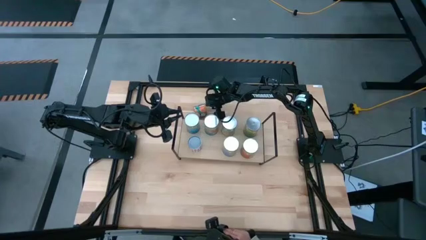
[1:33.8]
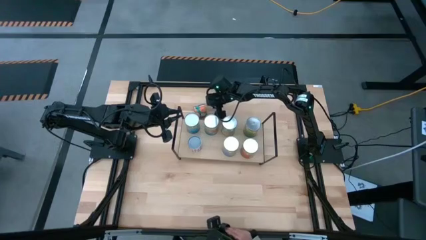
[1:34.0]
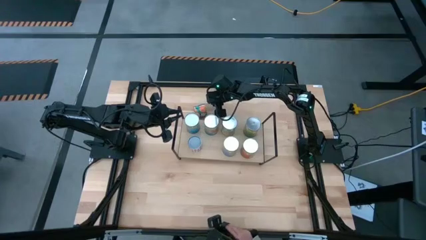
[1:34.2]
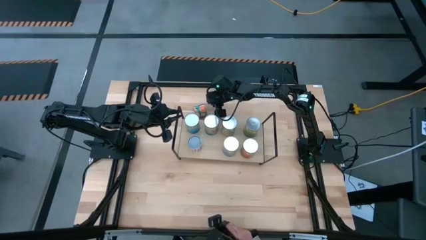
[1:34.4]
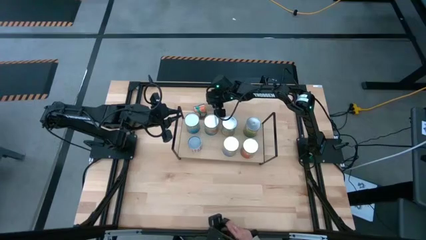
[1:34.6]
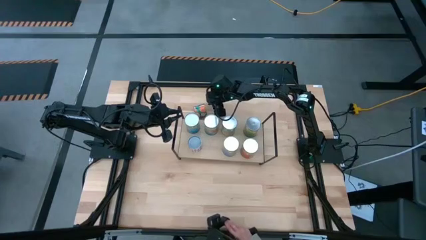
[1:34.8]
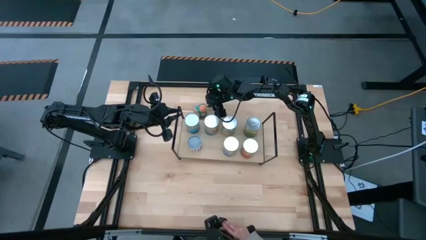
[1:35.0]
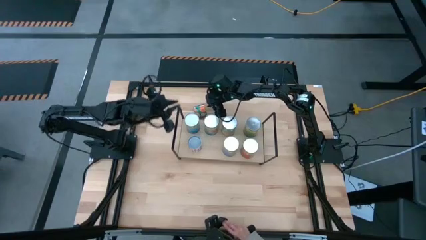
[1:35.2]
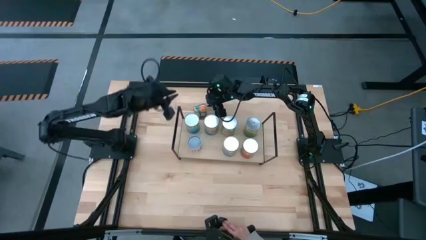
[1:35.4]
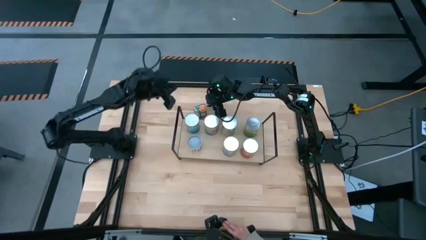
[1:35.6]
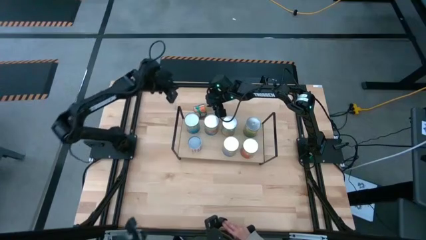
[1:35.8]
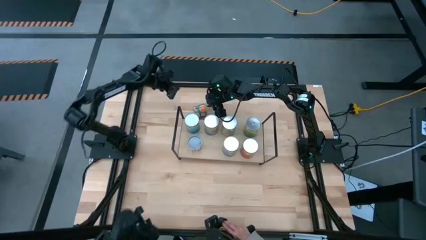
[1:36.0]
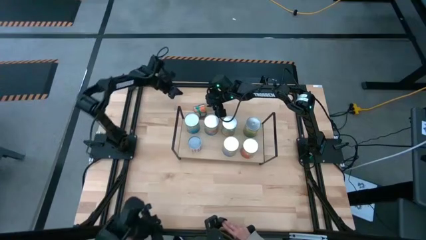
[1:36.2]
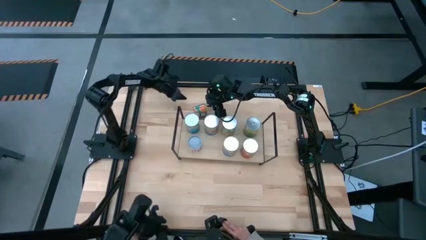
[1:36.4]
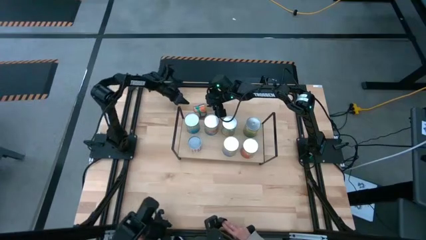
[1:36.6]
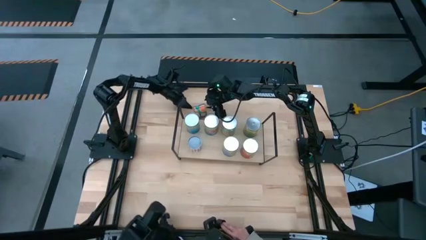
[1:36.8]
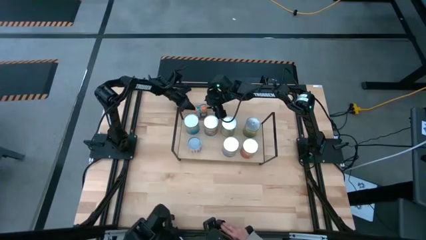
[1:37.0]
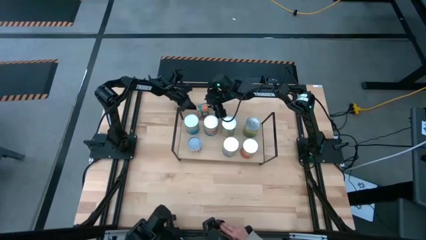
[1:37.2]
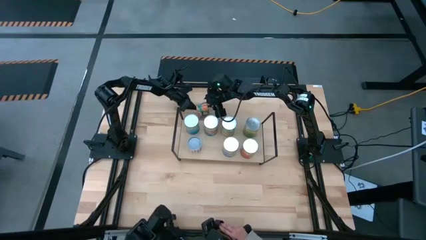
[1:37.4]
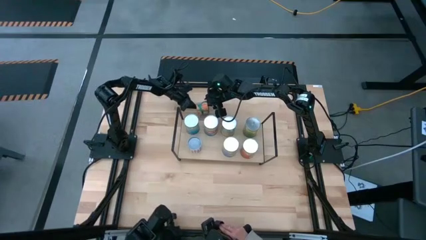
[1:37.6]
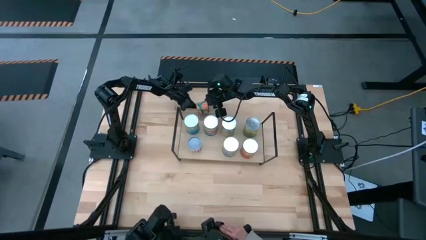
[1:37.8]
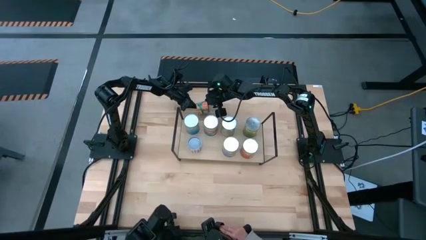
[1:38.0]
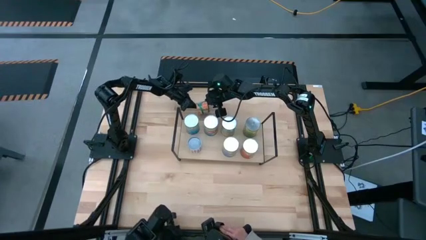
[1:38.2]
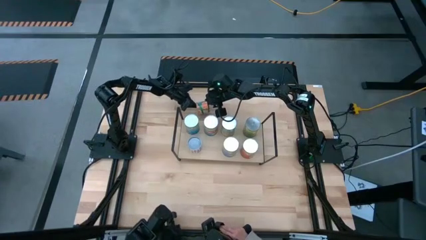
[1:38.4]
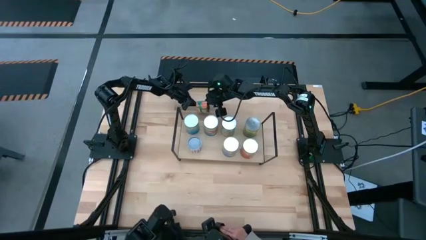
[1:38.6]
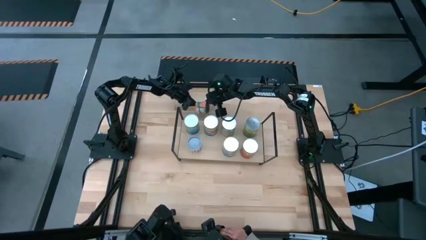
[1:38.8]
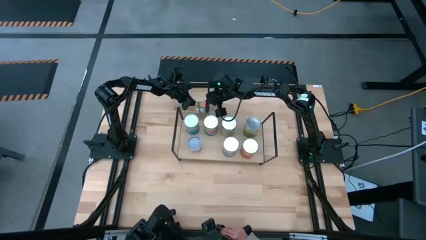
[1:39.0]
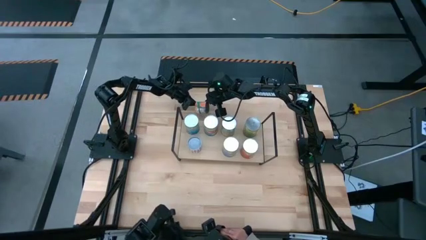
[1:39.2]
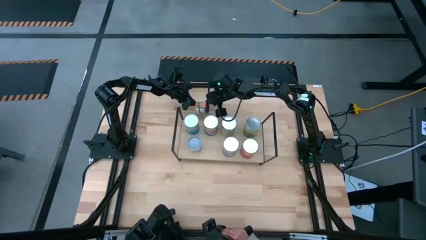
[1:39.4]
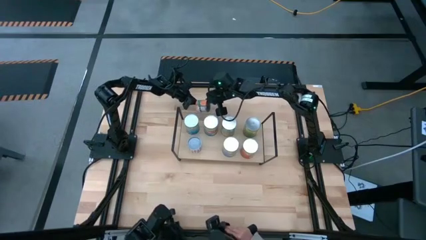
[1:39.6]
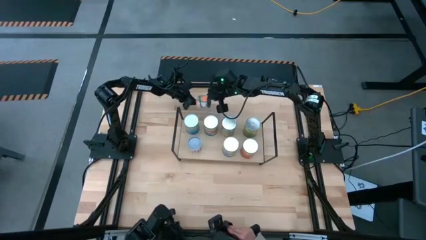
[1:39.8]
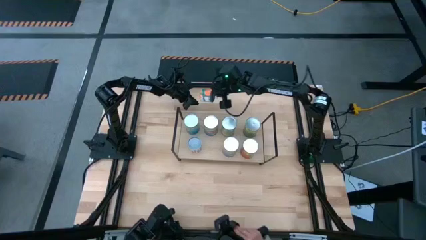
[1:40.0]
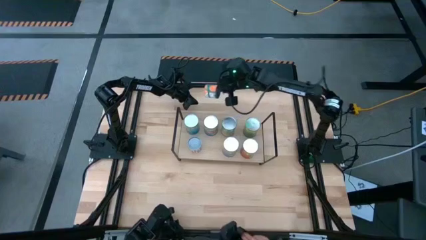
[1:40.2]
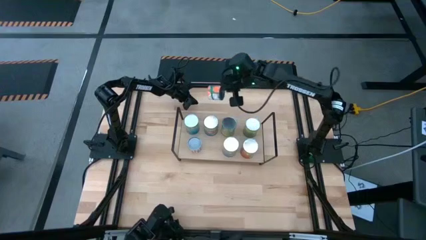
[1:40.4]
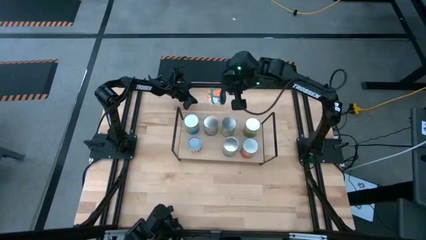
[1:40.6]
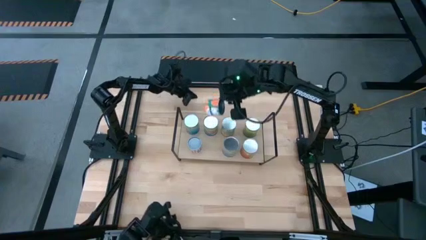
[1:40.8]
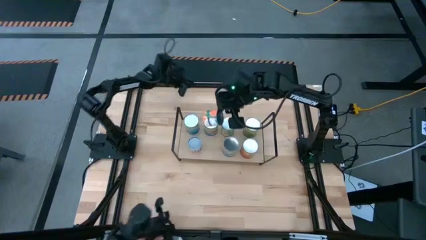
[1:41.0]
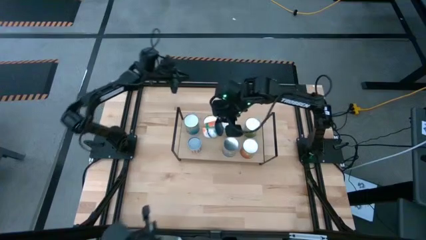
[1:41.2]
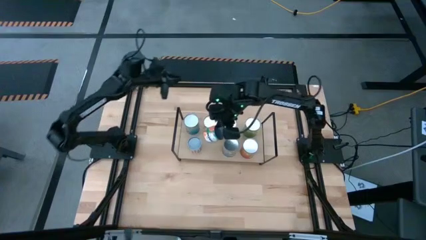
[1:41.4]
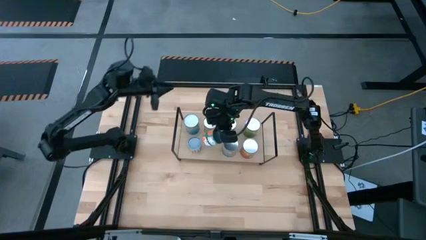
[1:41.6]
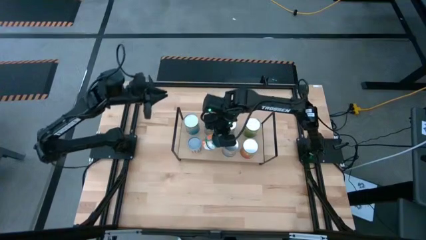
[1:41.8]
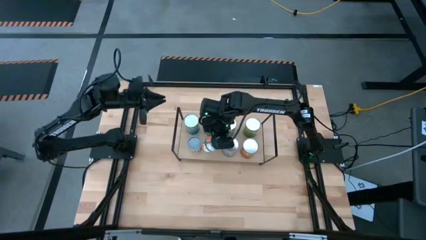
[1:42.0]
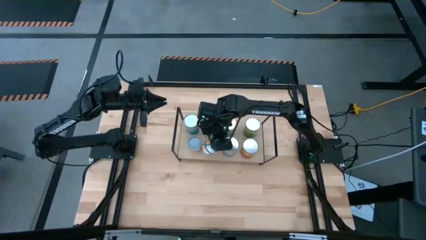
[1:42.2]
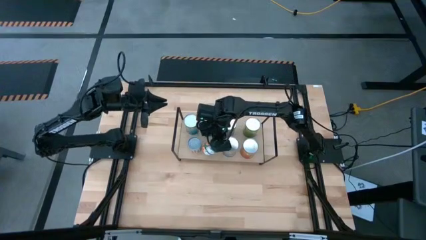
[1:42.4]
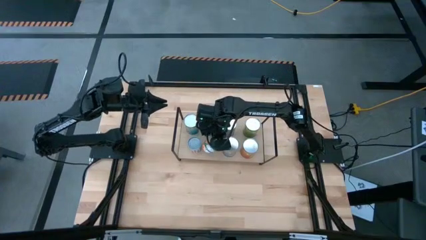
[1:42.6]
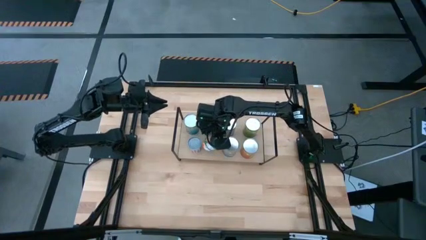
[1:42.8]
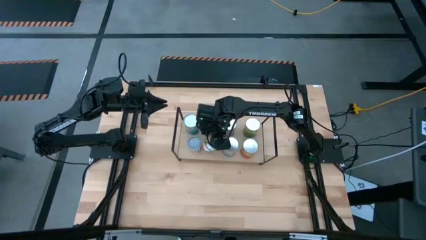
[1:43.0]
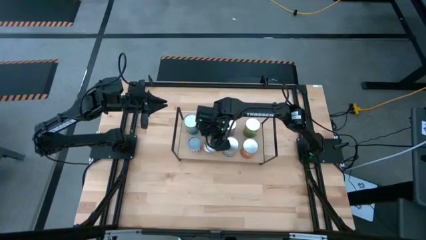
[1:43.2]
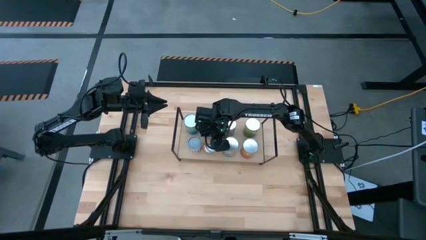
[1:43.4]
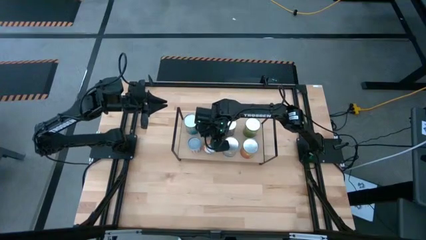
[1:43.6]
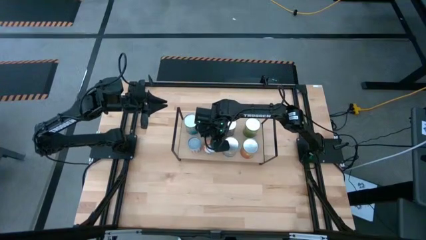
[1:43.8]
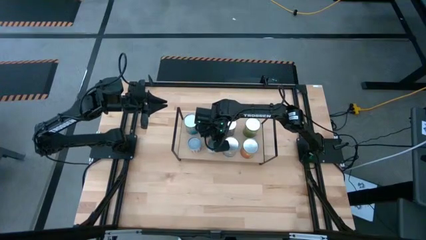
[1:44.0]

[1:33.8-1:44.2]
Task: Pick and place cans onto a shelf
Put the small canned oranges on the shelf

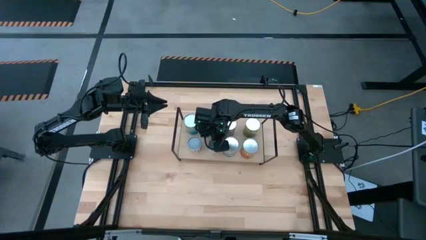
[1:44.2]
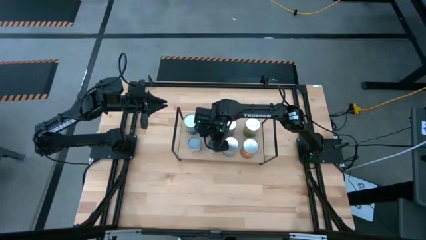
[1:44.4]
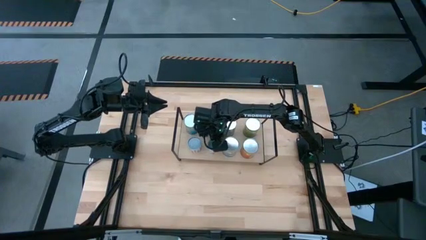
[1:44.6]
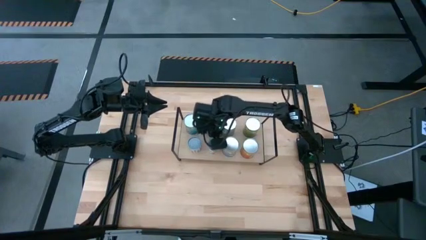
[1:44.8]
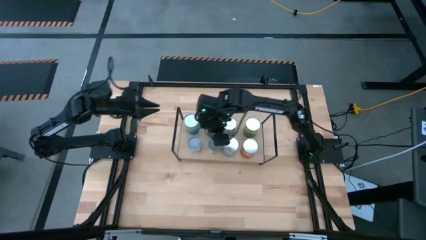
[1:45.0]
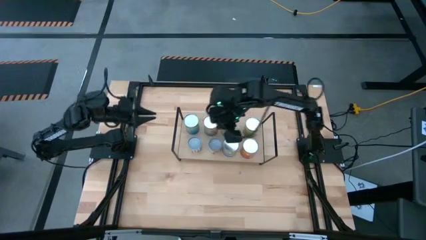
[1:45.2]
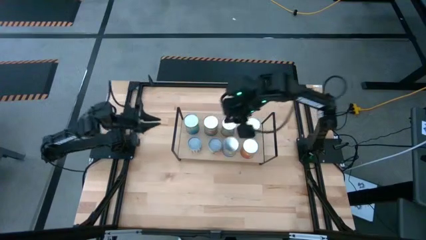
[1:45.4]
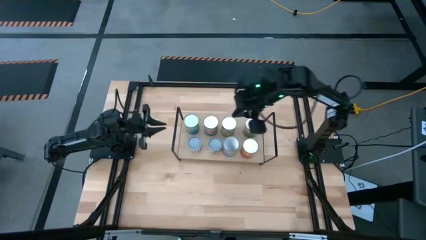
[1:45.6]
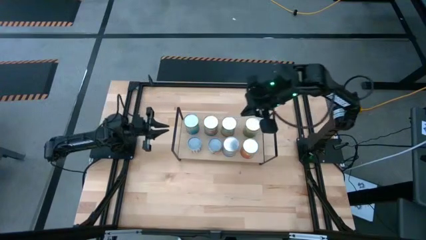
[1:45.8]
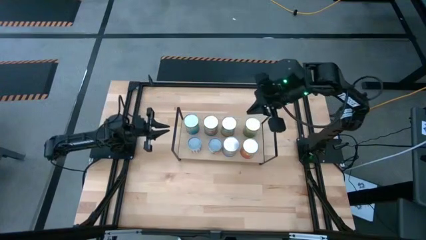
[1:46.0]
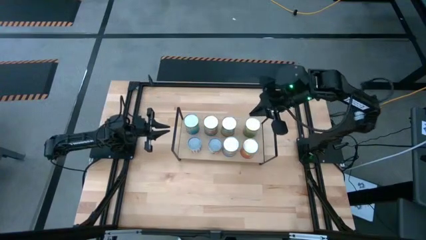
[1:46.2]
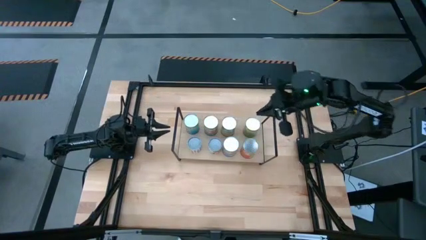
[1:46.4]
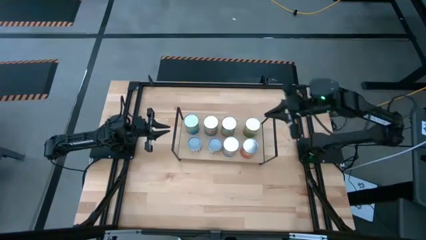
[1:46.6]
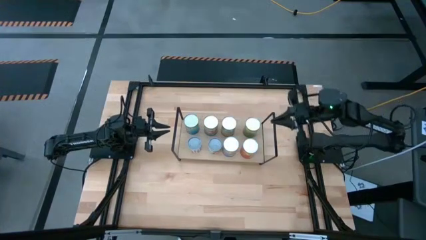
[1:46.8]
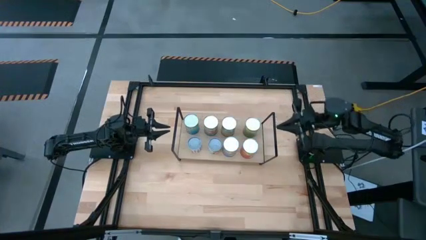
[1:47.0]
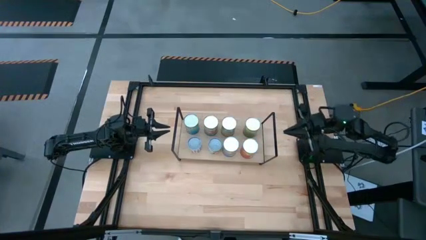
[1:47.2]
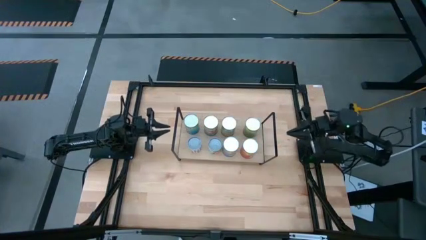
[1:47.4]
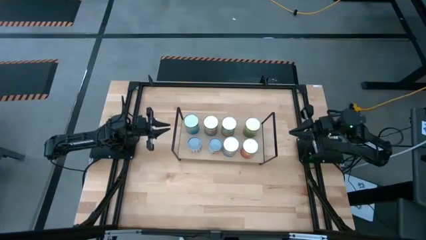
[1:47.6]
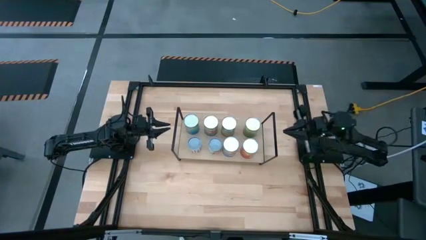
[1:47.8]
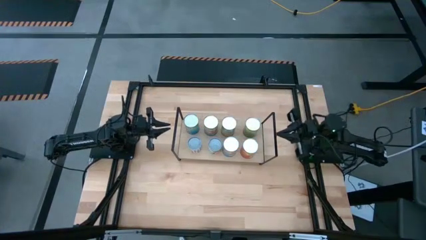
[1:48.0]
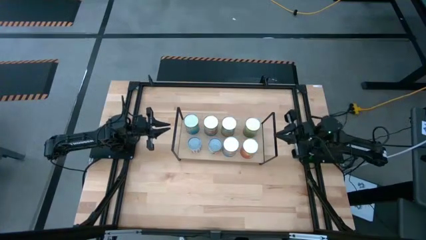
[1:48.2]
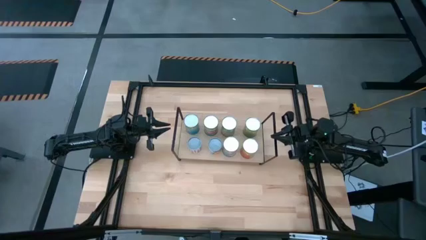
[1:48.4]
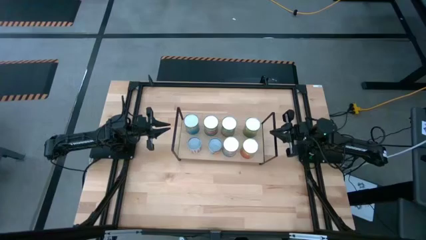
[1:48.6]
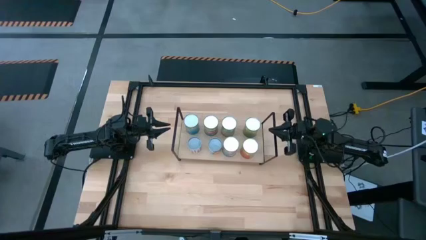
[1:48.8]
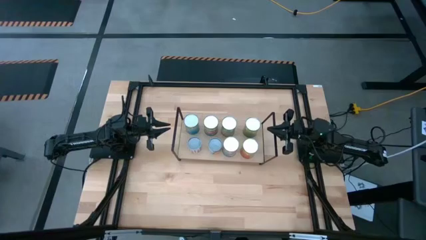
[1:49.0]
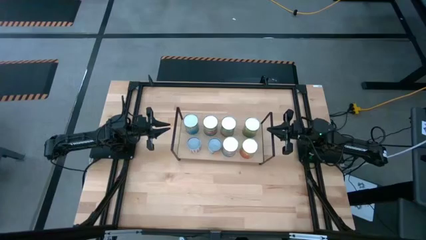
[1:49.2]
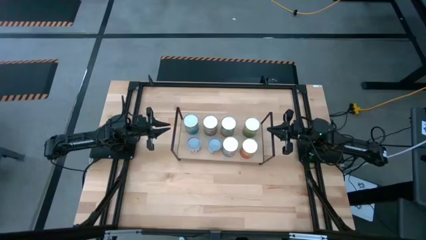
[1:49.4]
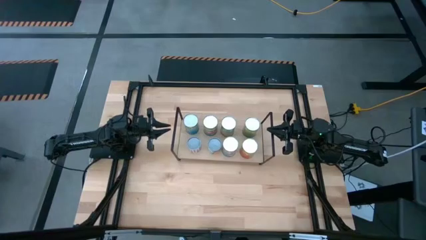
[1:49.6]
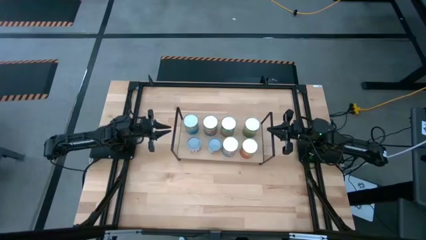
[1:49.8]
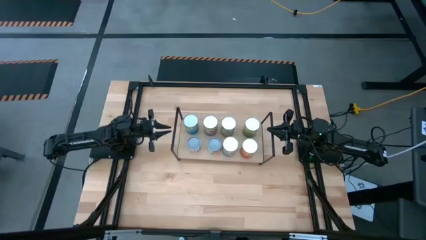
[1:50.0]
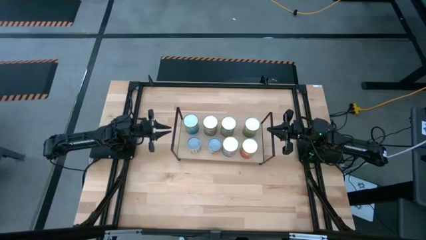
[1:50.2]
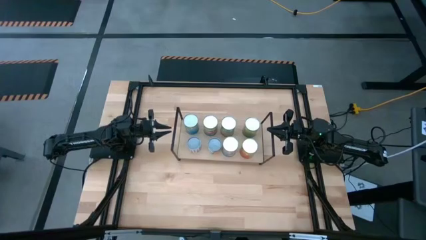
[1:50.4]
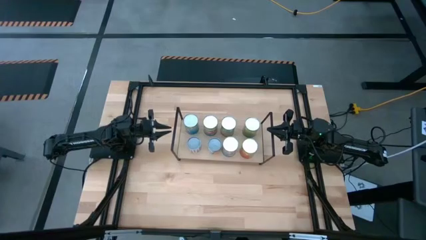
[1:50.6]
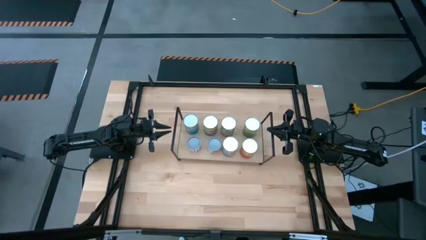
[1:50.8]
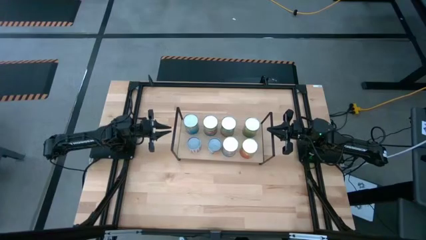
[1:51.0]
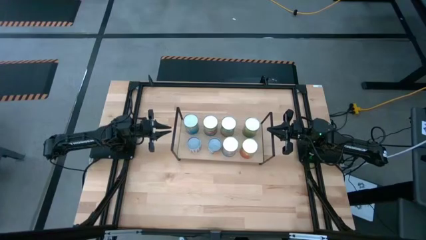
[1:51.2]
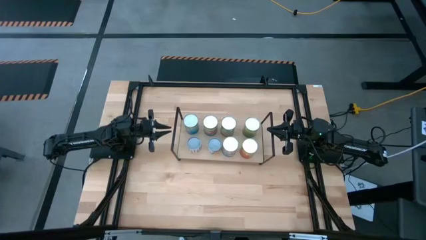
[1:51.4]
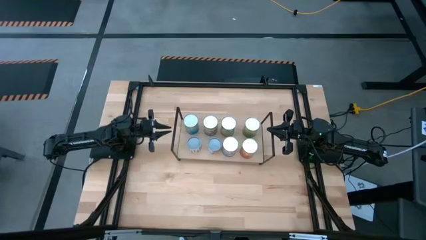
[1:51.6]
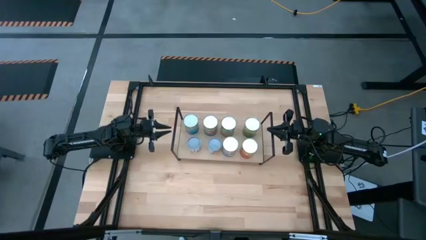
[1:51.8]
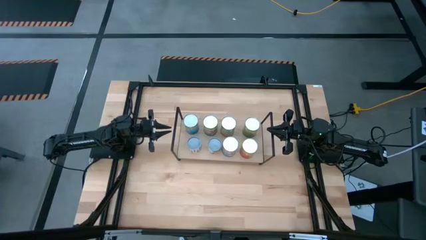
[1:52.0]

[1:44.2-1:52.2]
Return to Home Position
